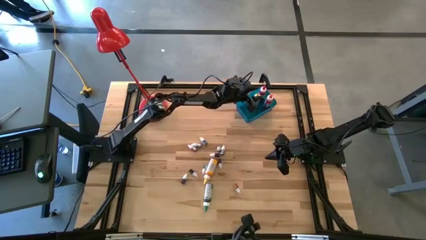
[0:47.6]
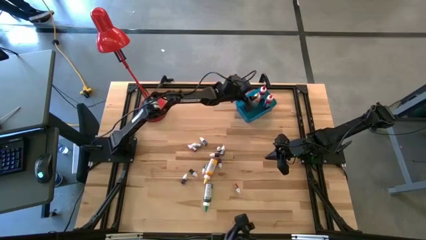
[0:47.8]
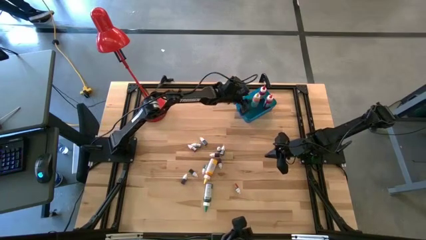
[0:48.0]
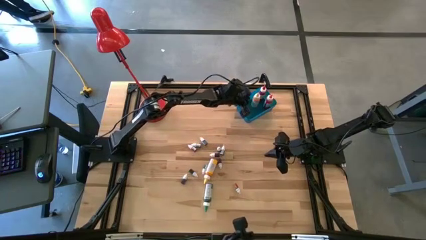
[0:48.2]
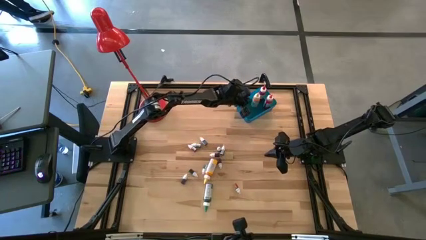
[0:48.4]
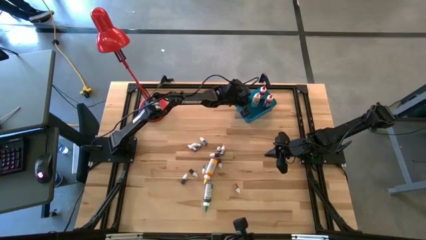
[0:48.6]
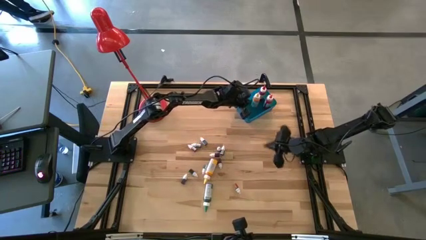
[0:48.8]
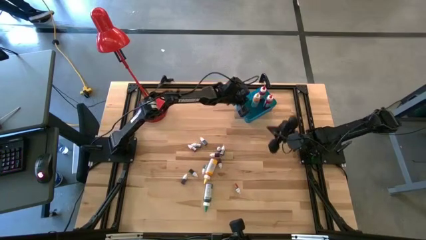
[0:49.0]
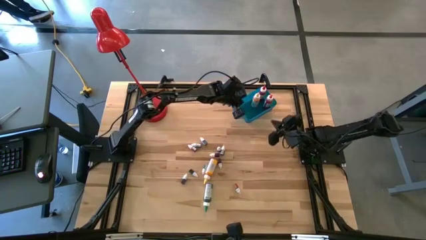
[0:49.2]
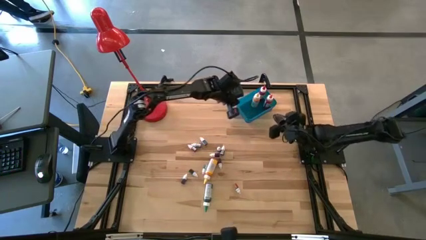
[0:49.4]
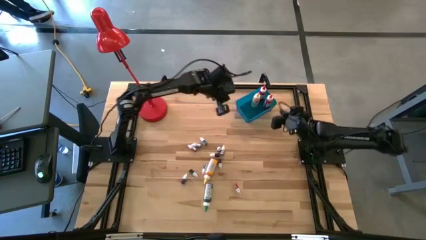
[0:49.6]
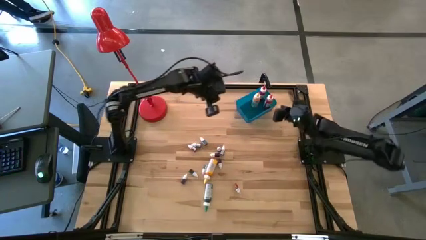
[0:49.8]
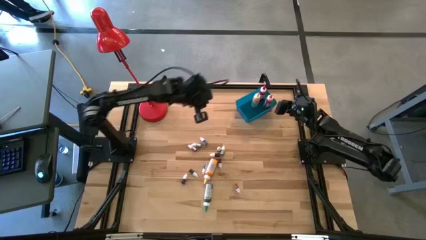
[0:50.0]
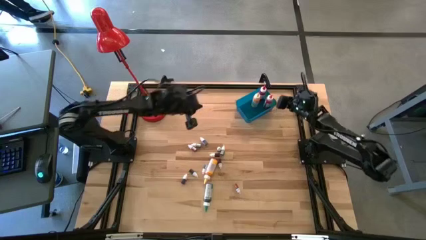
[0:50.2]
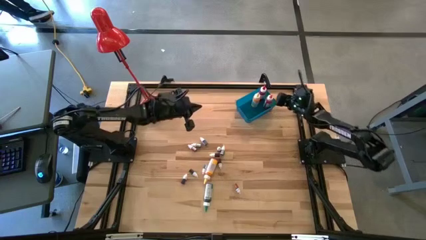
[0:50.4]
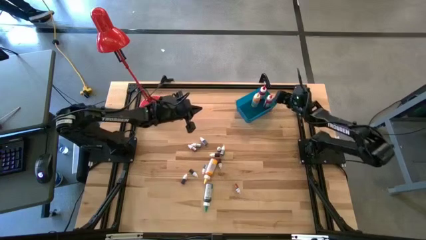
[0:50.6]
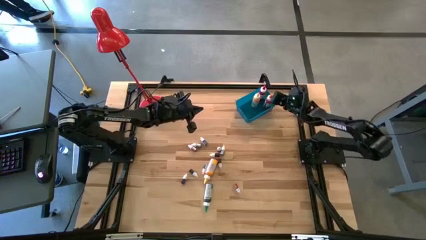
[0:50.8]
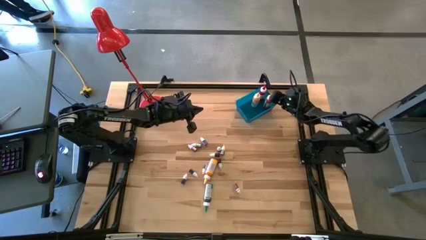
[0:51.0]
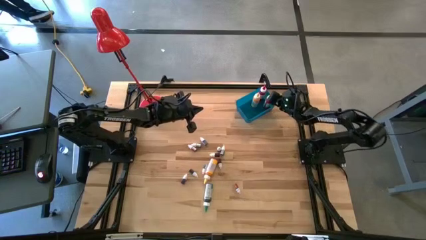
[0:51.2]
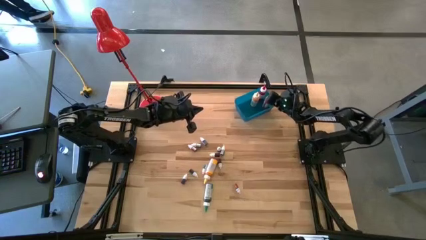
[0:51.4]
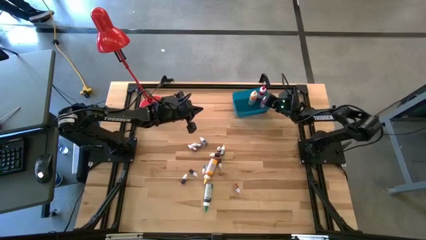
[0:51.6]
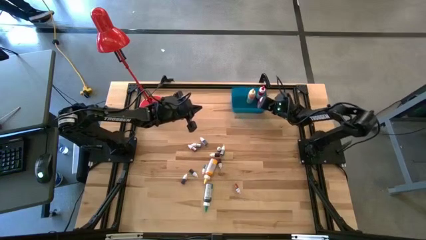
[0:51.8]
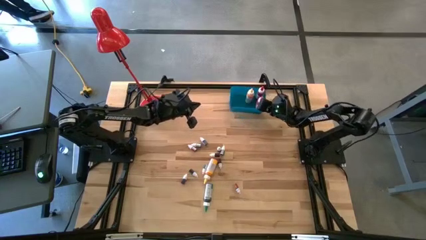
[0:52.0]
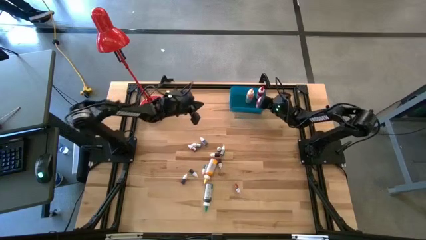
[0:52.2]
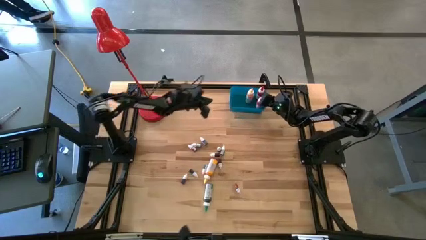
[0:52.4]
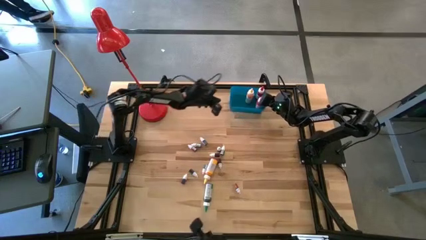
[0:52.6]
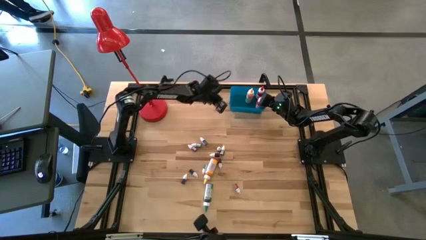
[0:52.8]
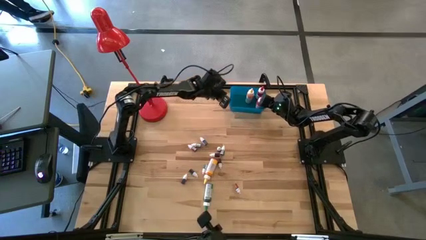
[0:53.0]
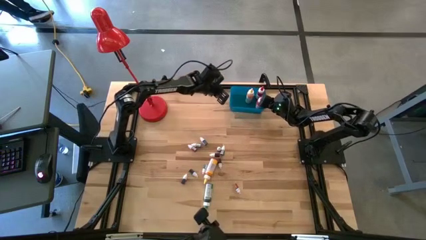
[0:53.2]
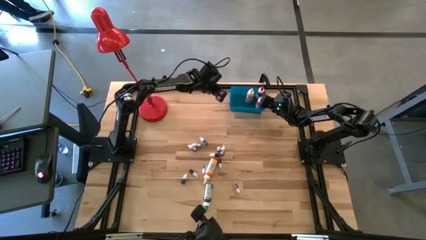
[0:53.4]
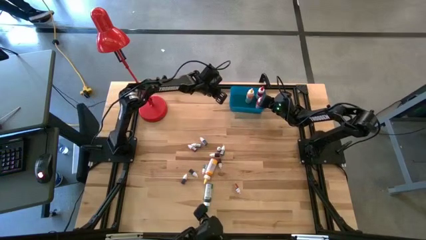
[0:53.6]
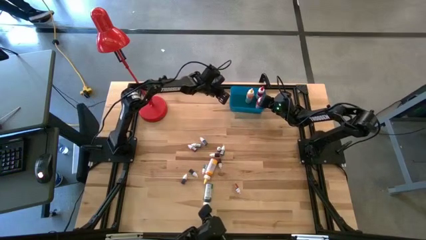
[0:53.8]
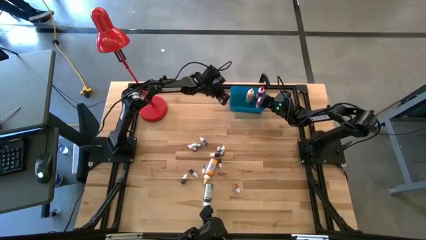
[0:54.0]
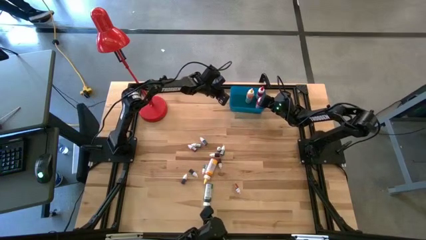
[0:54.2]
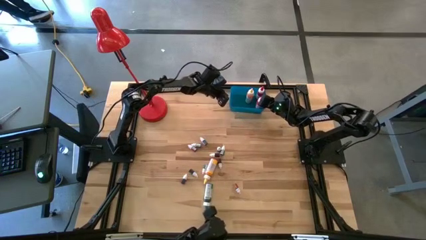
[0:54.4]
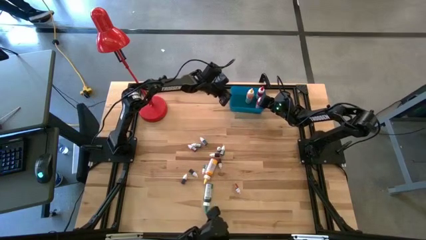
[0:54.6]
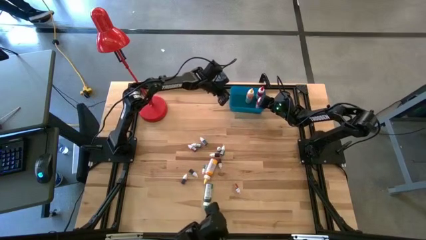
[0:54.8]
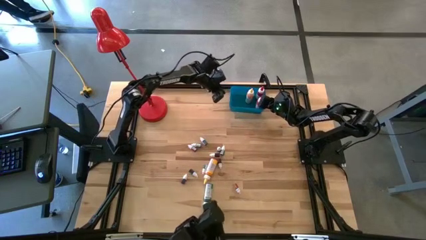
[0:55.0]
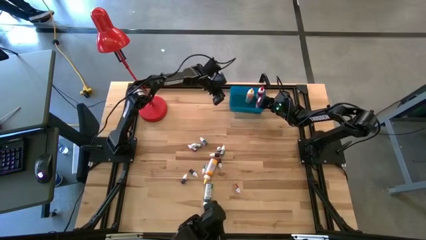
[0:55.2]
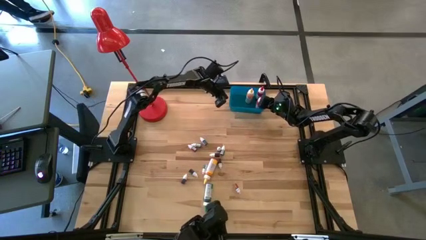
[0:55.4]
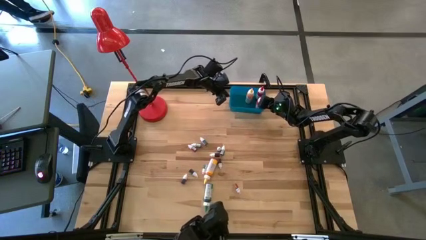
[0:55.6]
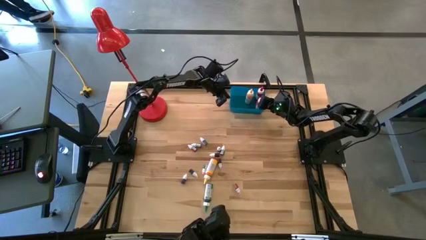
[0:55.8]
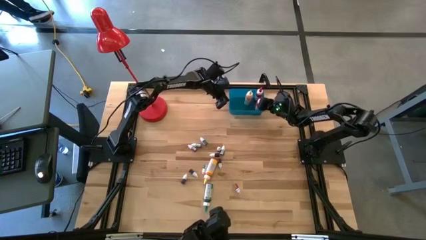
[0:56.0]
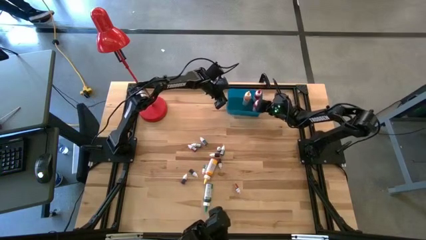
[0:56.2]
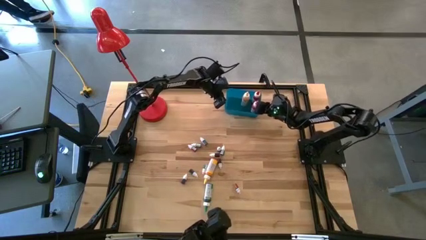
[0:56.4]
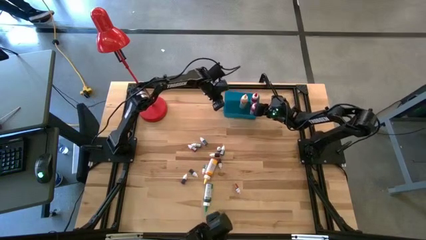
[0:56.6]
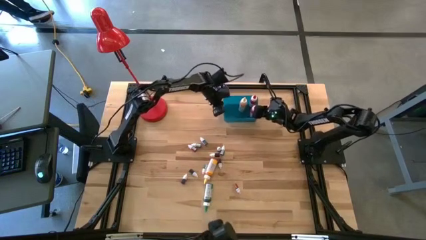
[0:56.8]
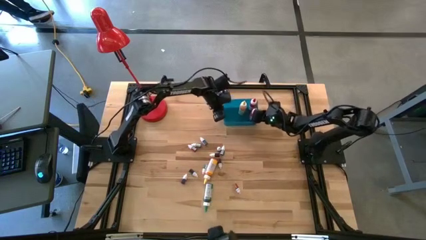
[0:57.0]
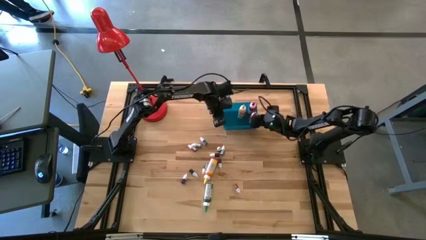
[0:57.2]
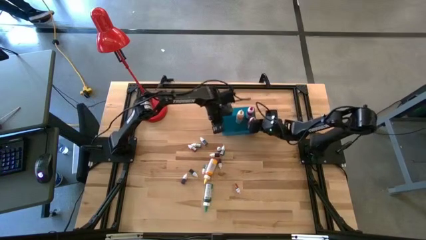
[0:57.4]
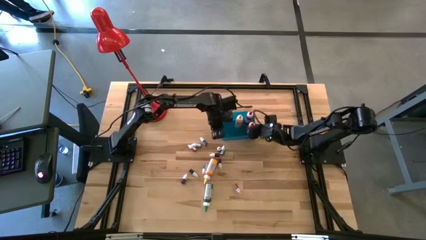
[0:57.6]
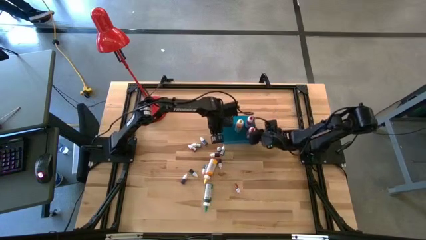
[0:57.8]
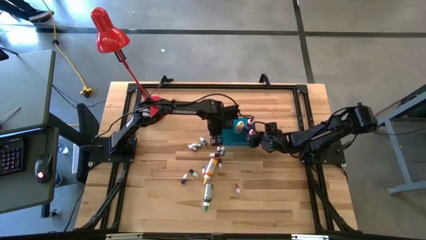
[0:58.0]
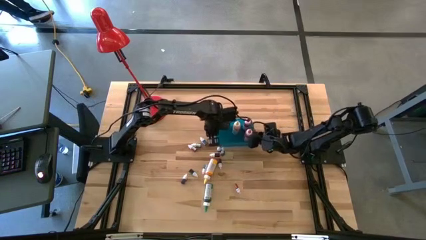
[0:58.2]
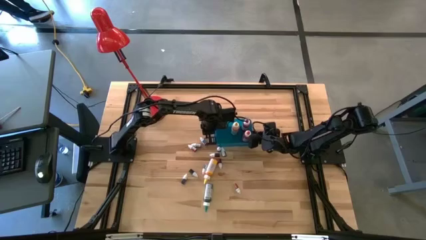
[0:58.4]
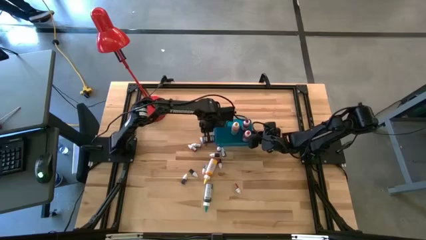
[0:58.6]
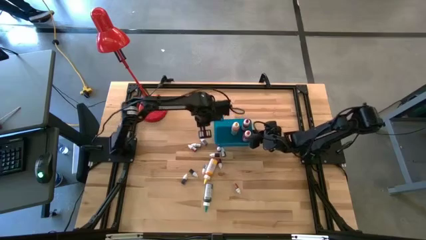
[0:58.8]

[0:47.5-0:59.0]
Task: Pick & Place food coloring
Move the blue bin to the center of the table

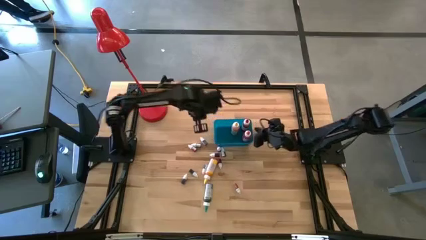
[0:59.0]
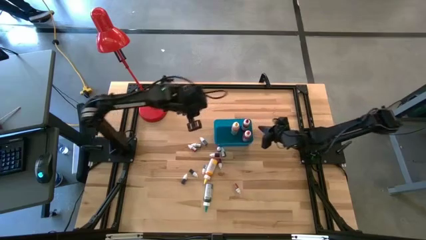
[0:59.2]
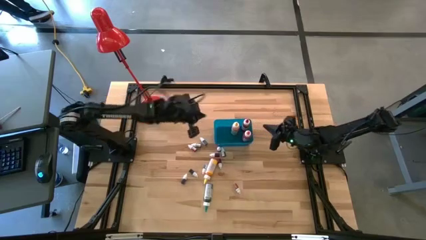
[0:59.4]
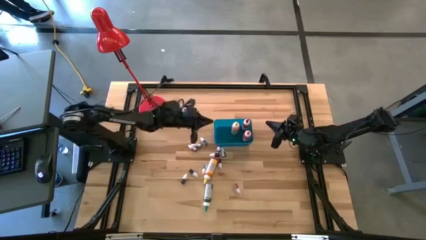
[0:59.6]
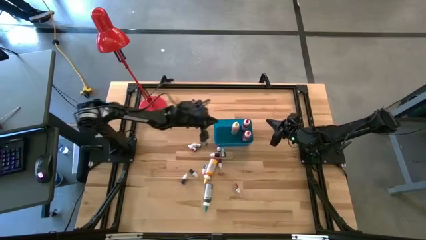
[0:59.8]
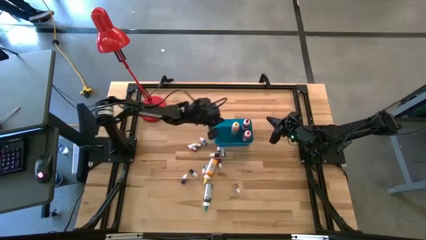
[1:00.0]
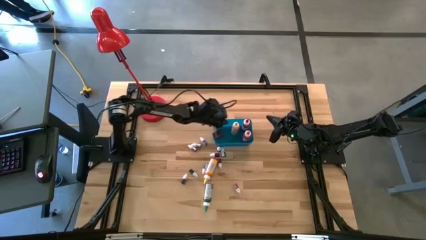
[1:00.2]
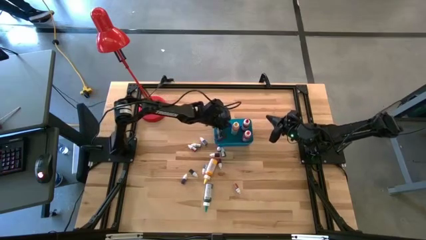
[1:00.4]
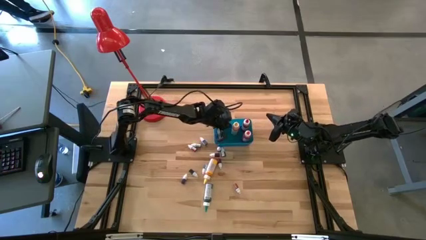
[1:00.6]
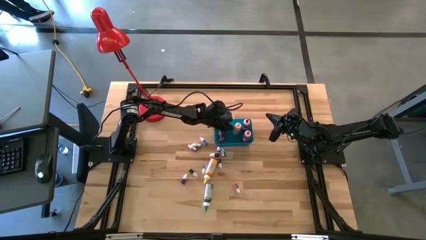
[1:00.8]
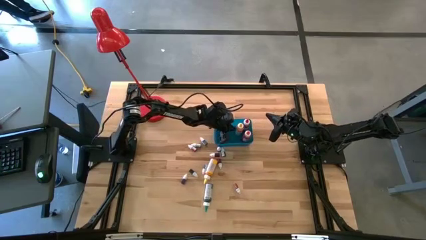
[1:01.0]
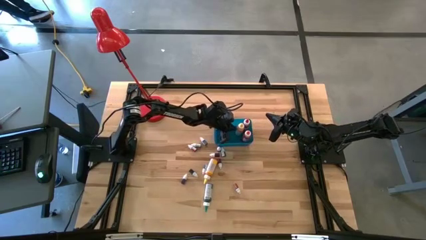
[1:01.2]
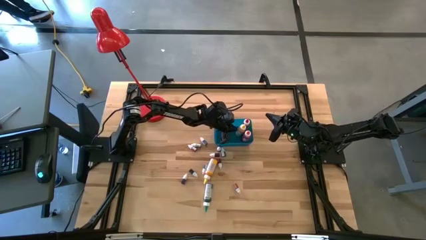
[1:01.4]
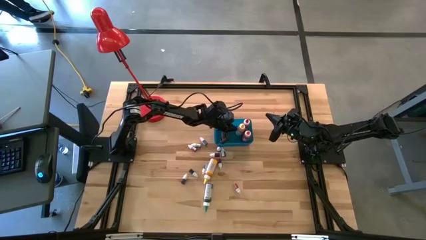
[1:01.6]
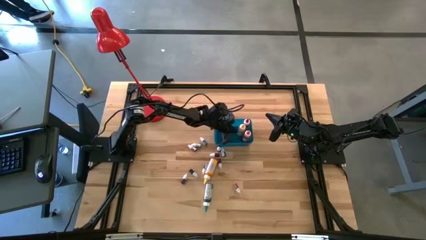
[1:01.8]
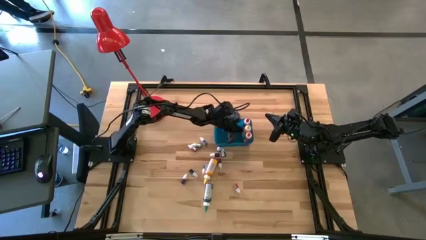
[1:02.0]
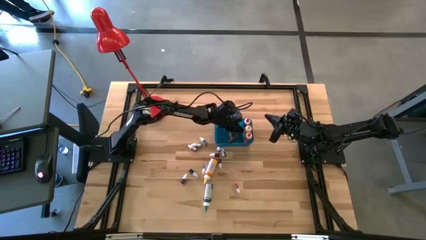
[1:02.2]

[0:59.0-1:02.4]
Adjust the big yellow food coloring bottle in the blue bin
